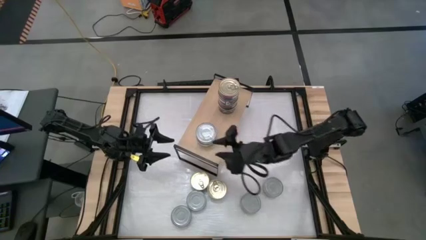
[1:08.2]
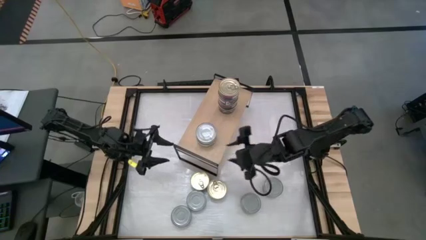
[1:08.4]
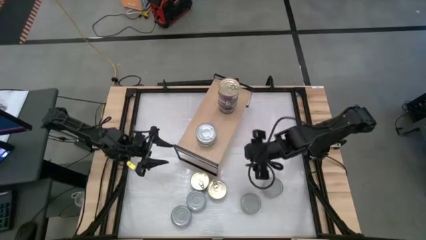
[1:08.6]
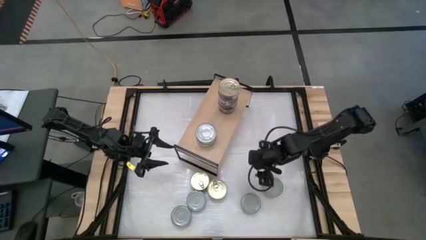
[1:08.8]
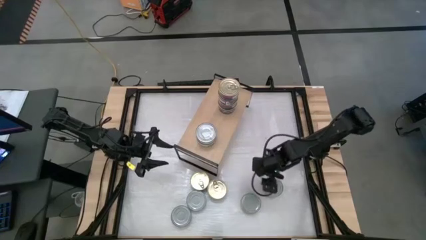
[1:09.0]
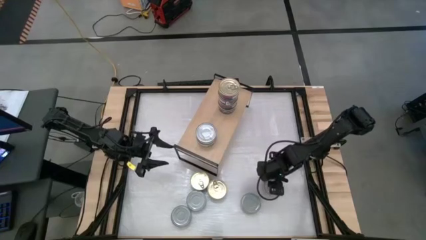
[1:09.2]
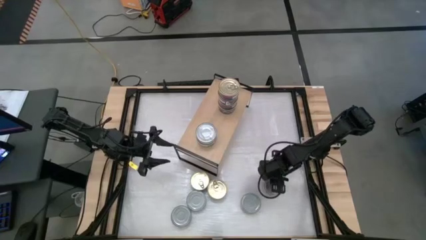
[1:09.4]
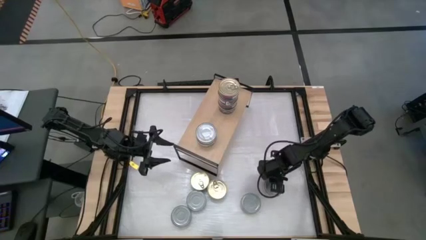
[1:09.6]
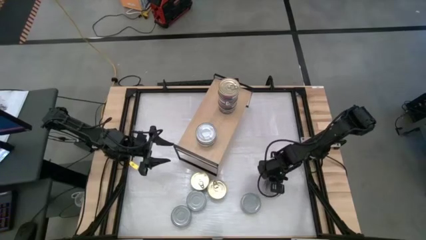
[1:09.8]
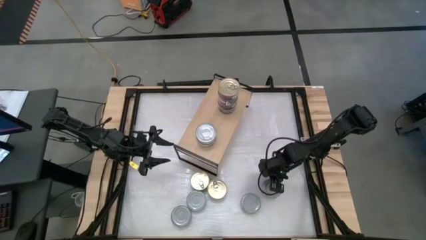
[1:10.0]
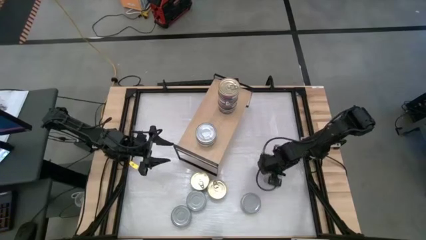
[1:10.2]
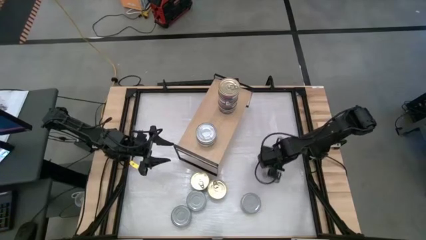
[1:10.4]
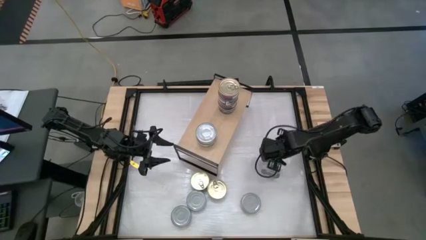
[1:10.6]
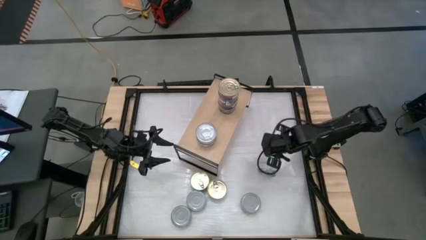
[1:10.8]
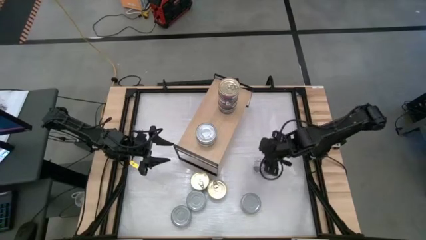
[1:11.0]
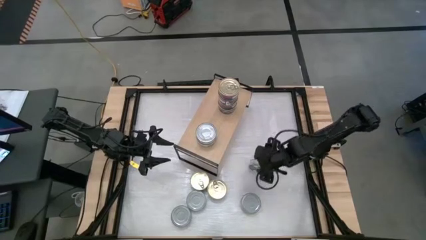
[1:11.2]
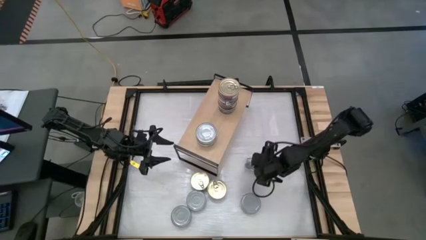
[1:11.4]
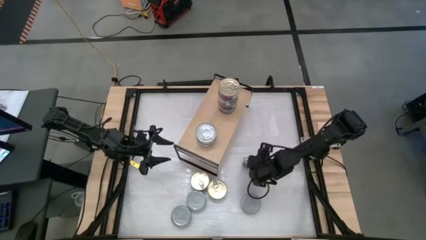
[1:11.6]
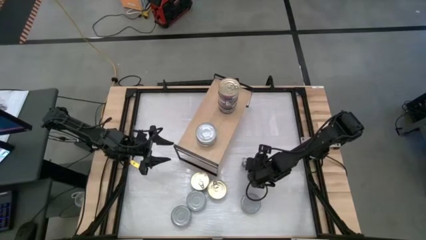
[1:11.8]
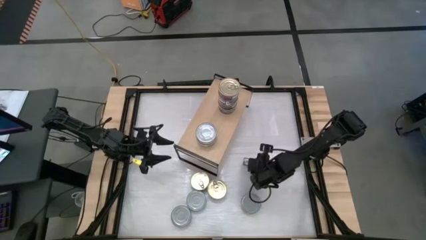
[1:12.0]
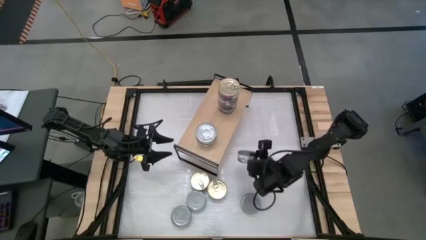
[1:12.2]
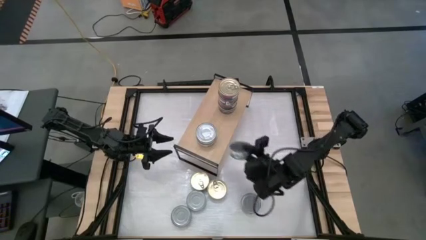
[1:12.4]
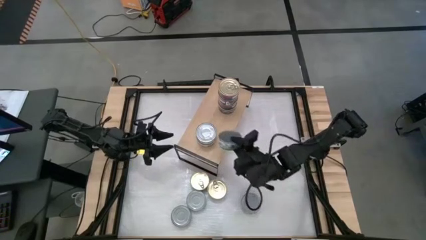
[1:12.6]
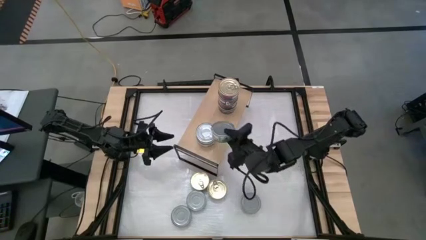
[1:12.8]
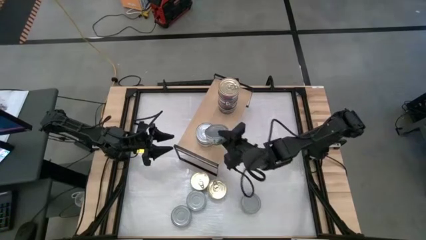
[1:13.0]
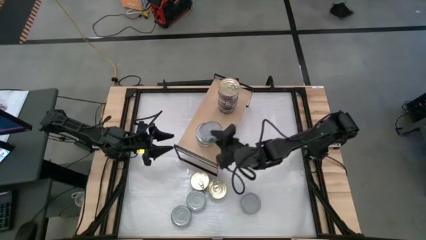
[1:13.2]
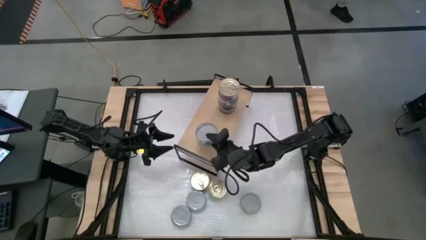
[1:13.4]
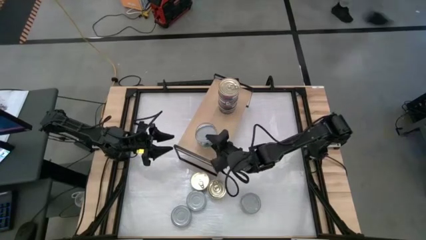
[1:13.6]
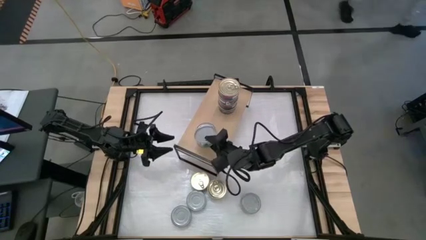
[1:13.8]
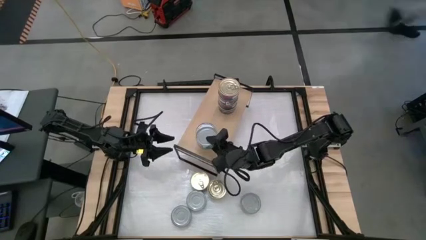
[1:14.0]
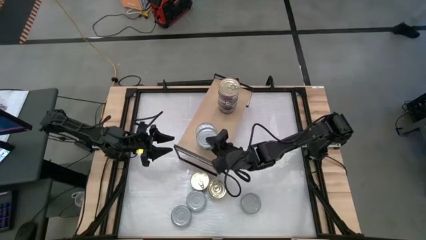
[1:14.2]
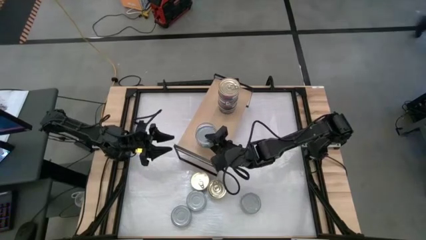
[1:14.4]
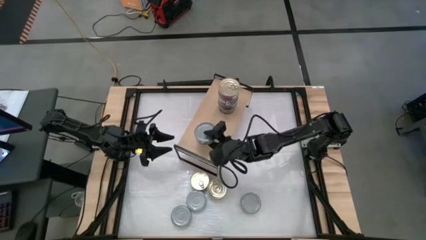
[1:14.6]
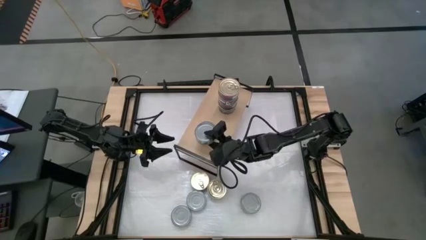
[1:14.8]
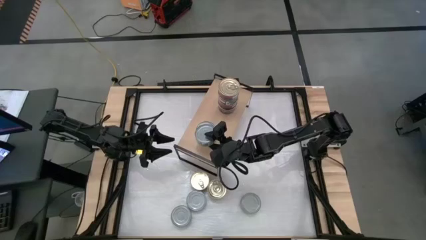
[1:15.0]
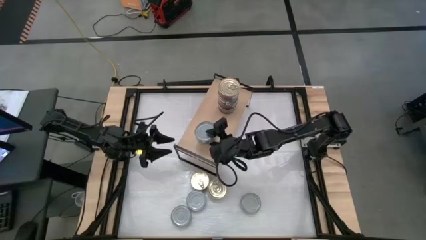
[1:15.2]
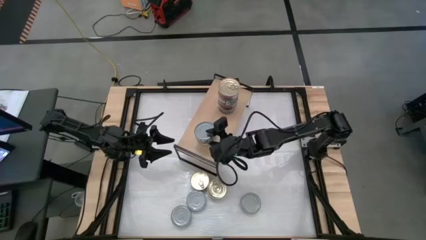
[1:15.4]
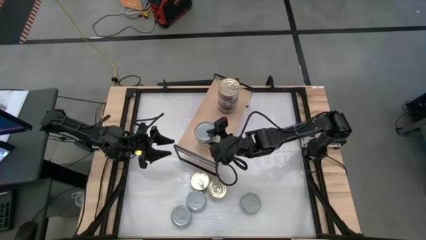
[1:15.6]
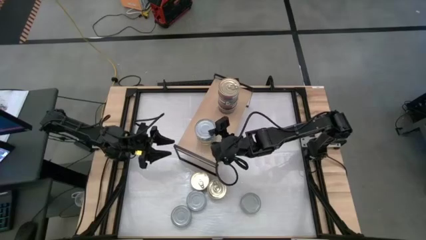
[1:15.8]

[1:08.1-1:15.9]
Task: Stack canned seafood by type on shelf
Stack the green tuna can on top of the stacked green tuna cans on the shelf

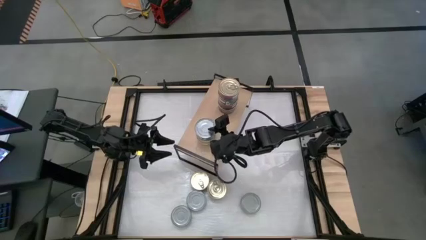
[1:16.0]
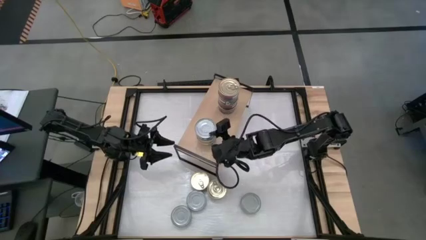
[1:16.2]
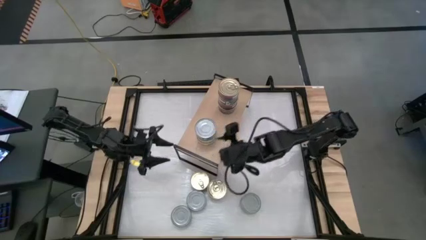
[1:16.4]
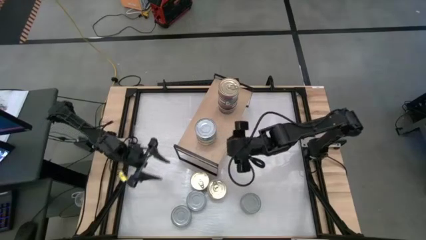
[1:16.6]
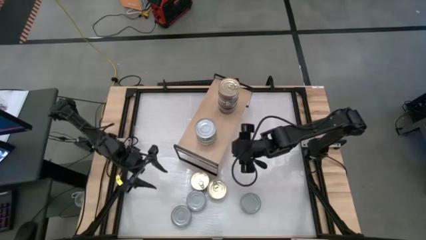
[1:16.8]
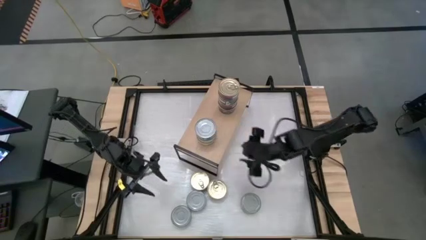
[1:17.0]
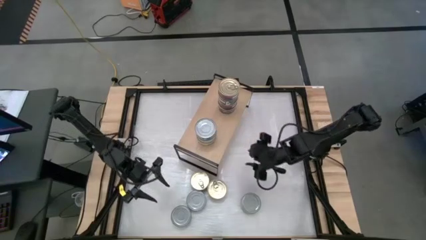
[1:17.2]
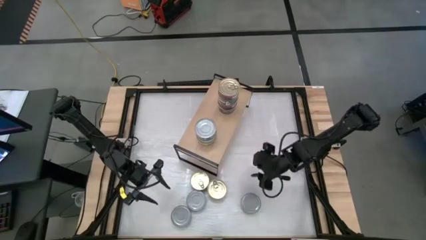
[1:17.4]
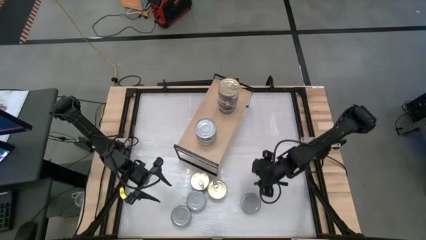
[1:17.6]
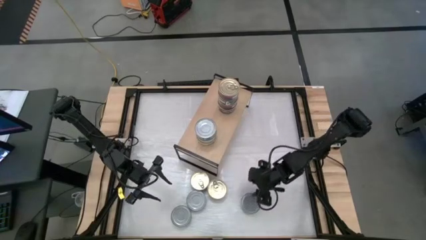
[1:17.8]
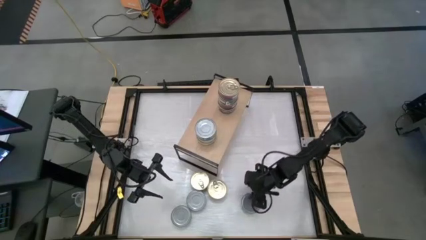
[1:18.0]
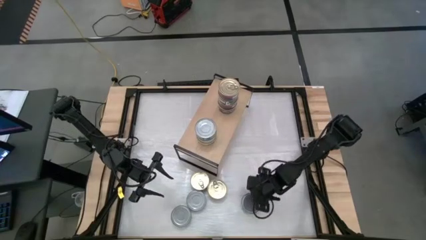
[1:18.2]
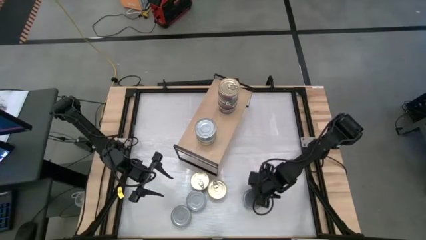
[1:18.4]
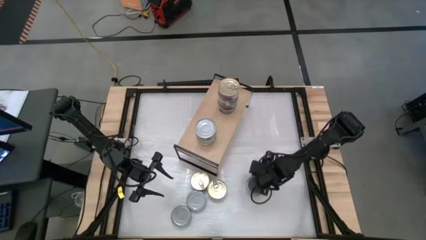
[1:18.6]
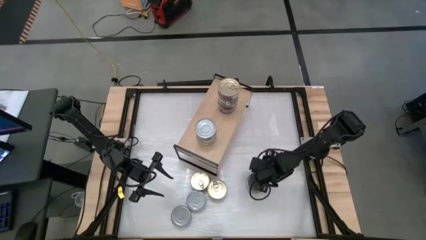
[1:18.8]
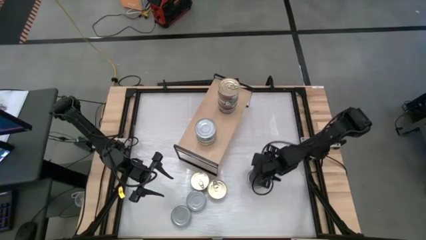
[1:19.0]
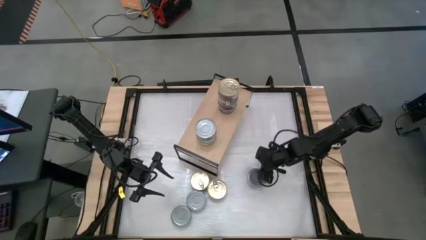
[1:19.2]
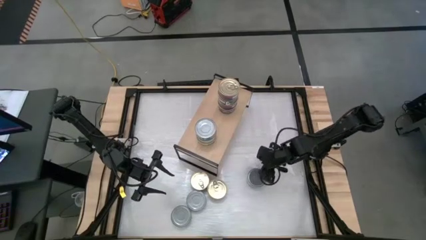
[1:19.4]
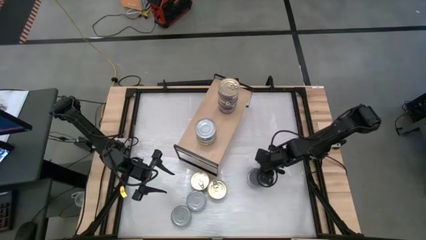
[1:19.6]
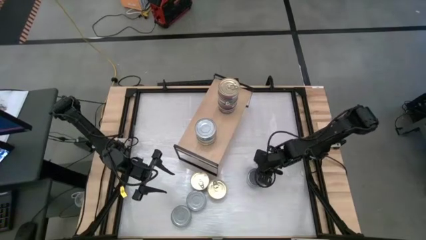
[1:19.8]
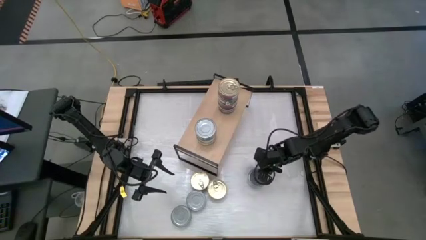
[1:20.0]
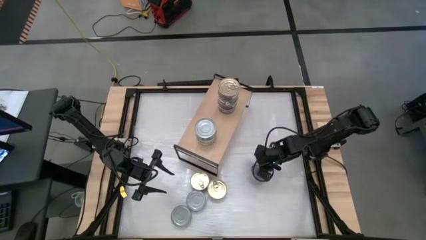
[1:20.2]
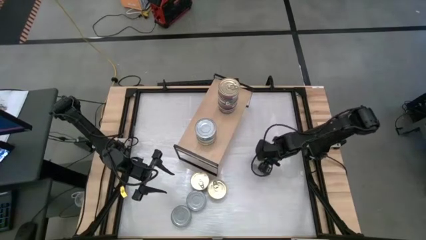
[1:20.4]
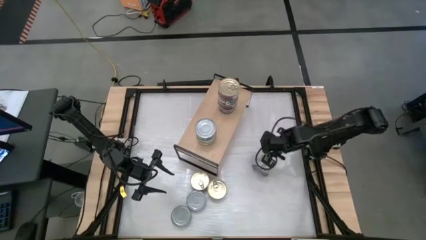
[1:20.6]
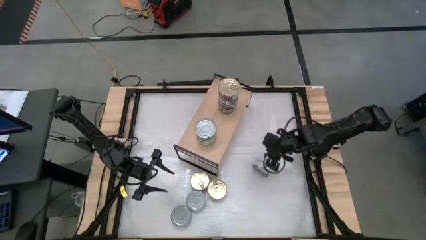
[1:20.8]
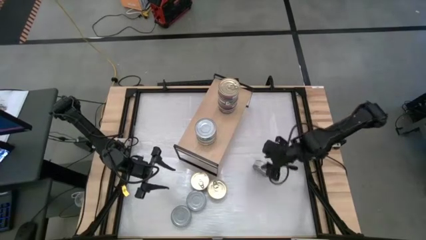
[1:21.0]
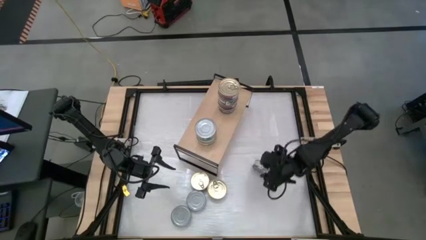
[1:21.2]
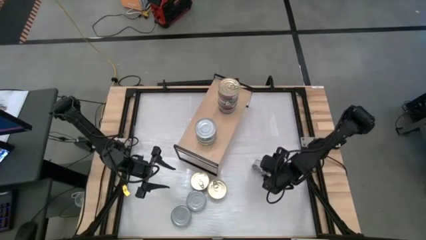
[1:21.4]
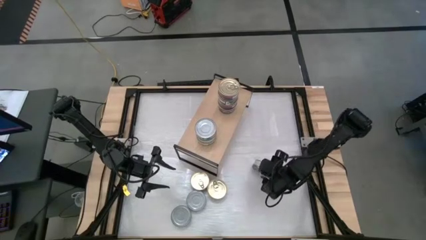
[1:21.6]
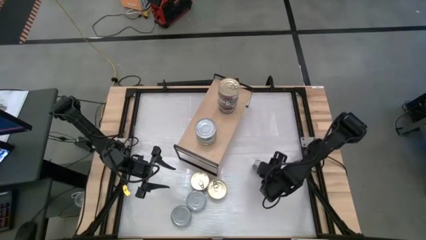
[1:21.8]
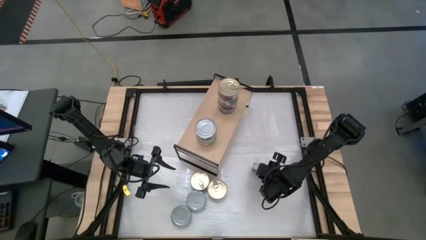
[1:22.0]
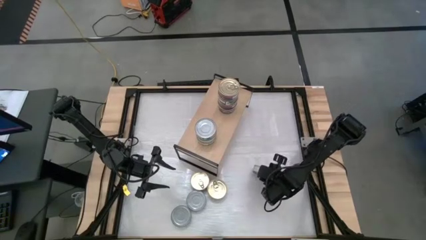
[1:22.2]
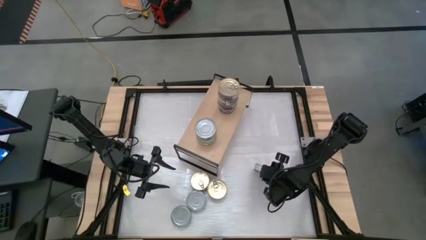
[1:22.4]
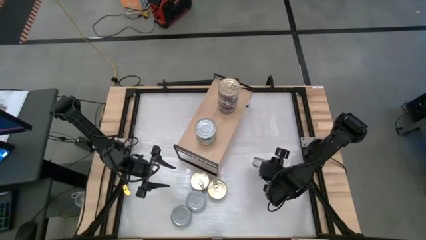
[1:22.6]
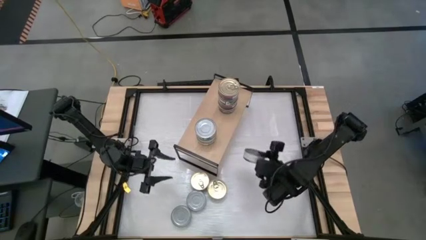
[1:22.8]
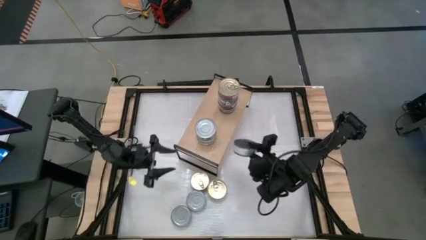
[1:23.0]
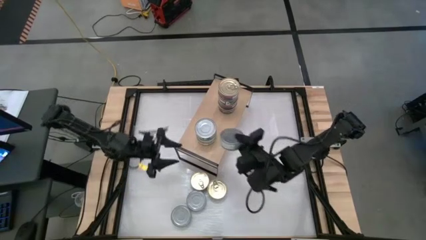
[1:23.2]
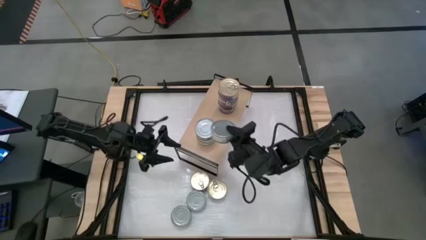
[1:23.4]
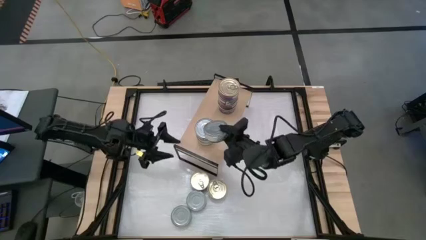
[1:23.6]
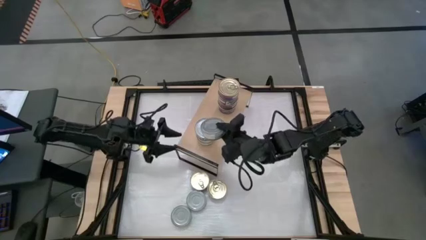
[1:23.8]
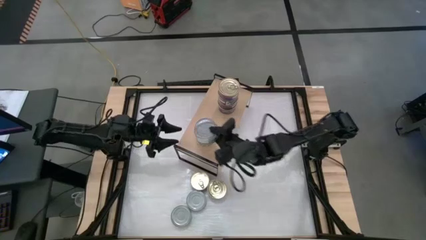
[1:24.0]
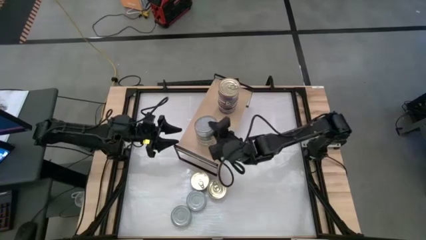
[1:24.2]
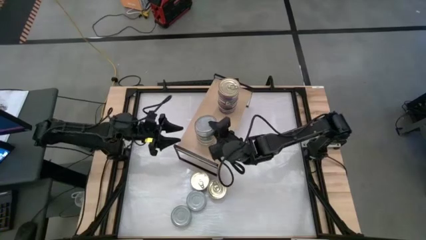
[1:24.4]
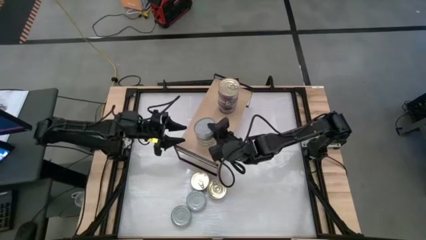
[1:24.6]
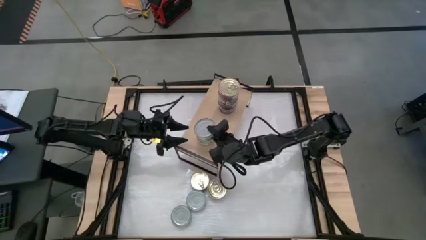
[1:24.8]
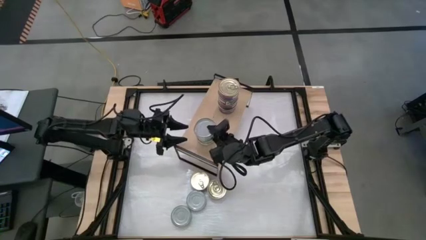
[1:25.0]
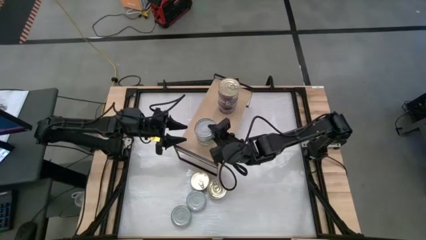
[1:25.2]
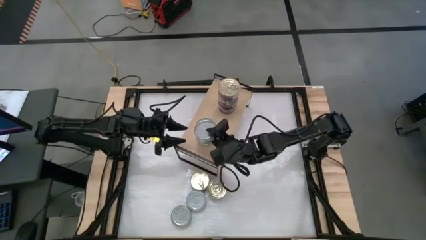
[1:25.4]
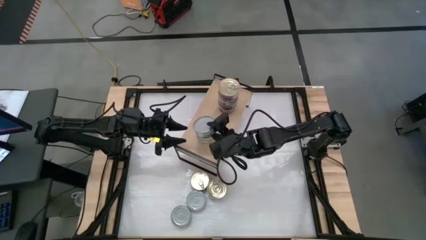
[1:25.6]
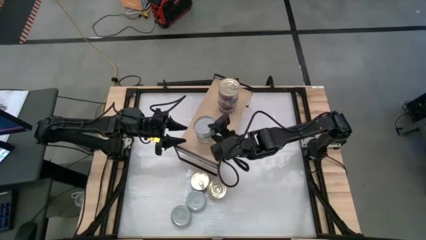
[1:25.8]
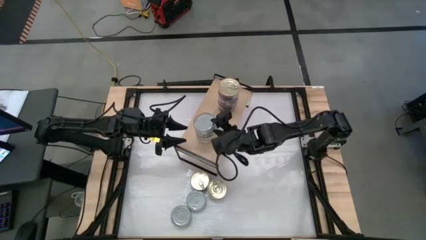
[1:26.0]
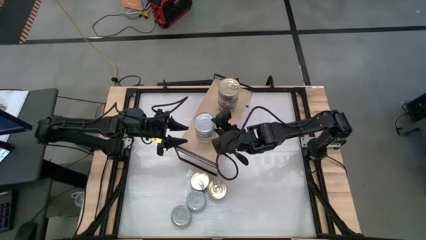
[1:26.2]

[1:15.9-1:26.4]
Stack the green tuna can on top of the stacked green tuna cans on the shelf
